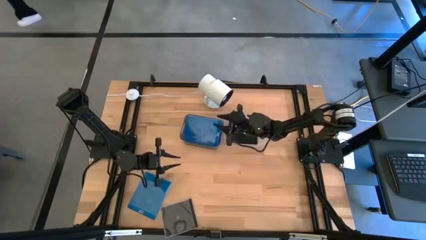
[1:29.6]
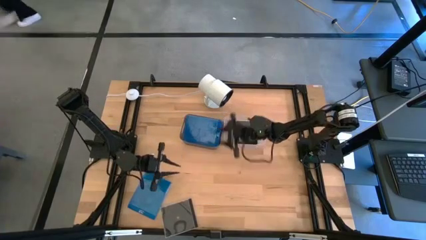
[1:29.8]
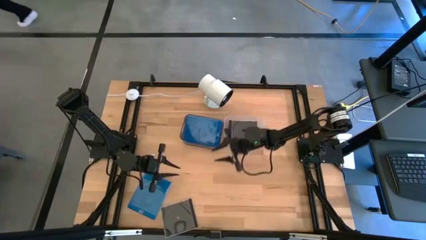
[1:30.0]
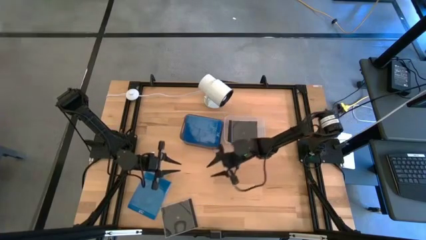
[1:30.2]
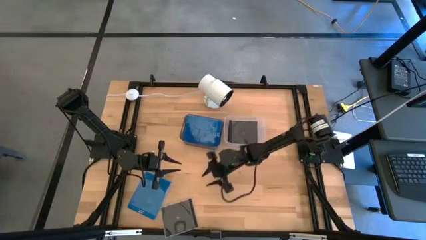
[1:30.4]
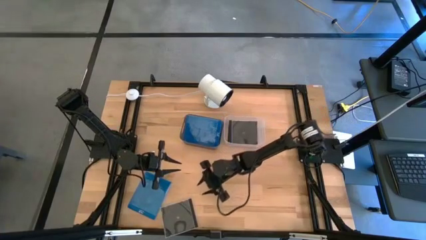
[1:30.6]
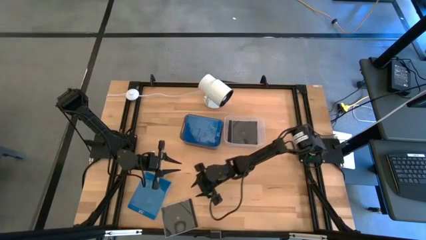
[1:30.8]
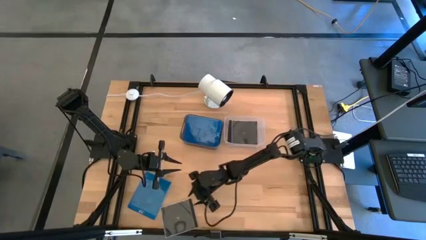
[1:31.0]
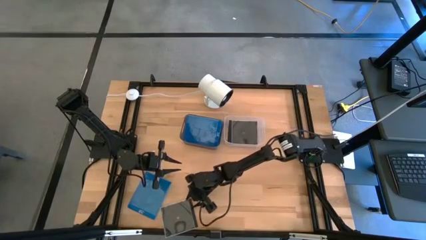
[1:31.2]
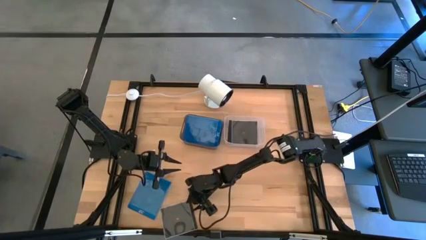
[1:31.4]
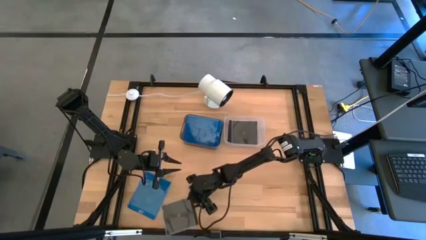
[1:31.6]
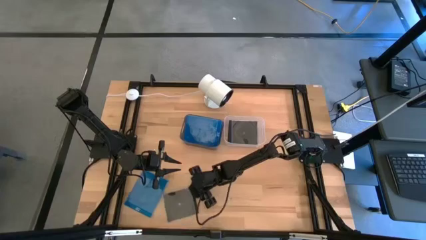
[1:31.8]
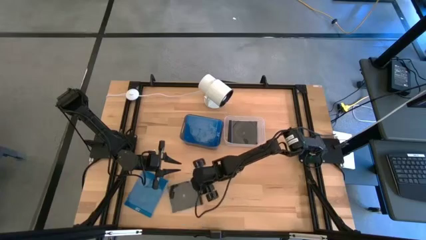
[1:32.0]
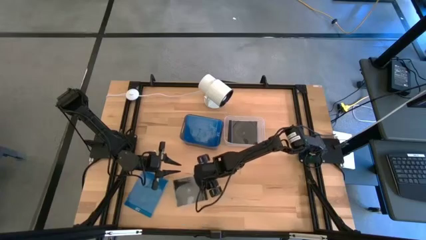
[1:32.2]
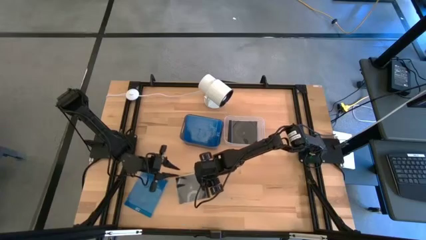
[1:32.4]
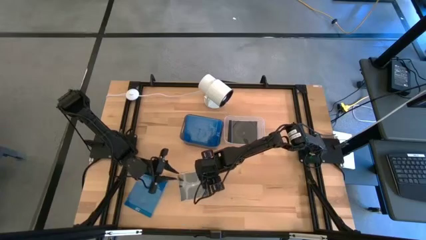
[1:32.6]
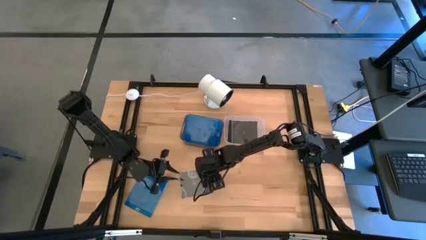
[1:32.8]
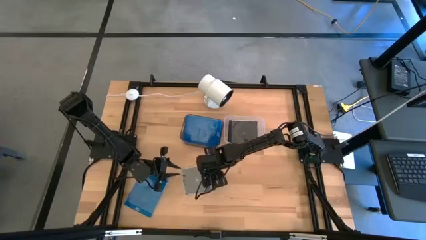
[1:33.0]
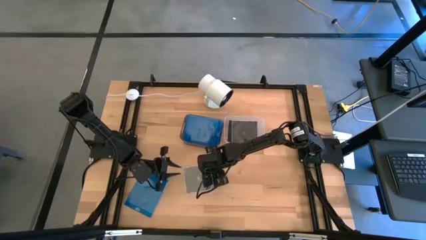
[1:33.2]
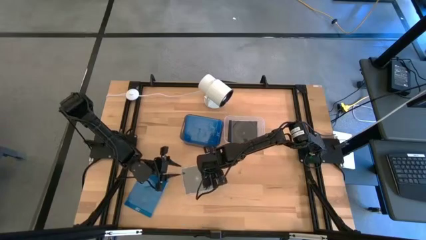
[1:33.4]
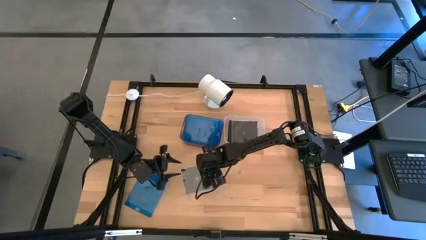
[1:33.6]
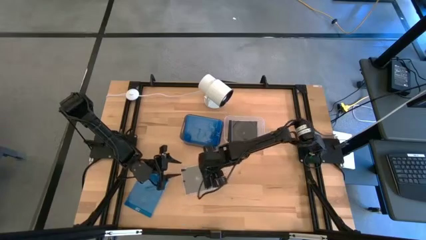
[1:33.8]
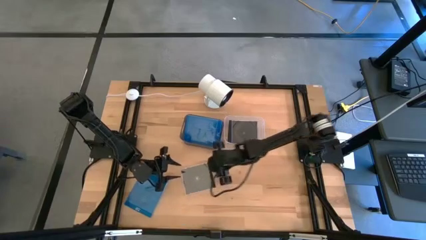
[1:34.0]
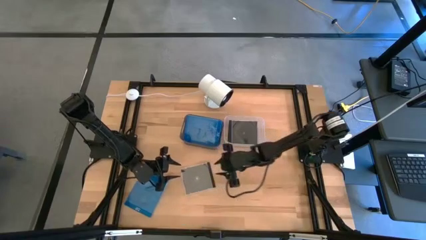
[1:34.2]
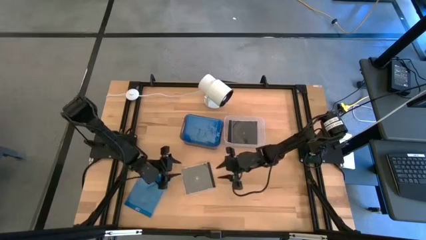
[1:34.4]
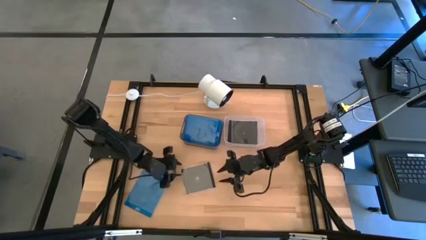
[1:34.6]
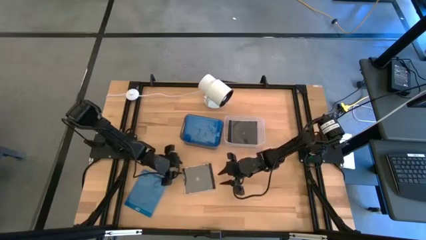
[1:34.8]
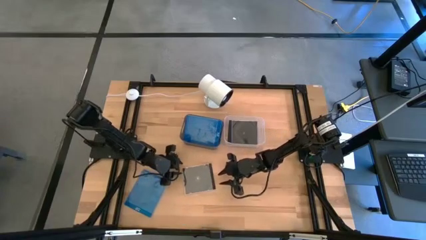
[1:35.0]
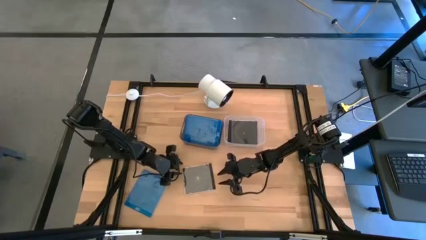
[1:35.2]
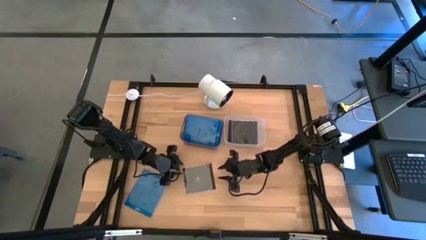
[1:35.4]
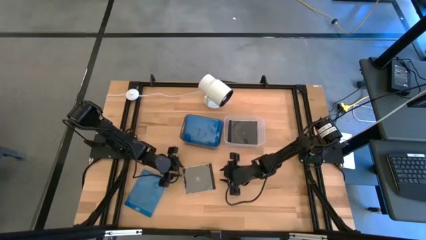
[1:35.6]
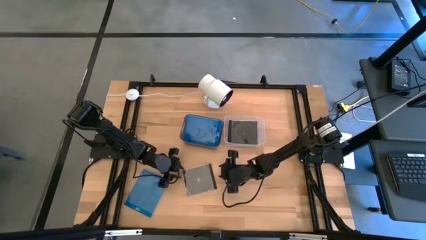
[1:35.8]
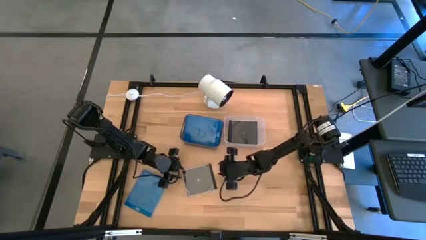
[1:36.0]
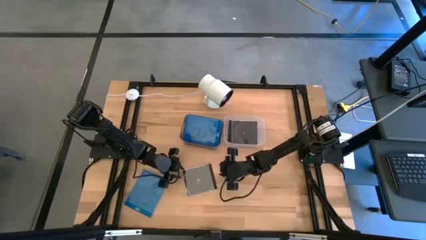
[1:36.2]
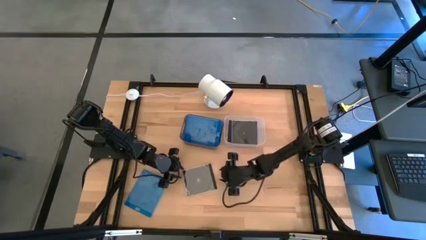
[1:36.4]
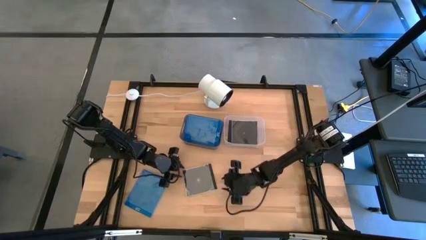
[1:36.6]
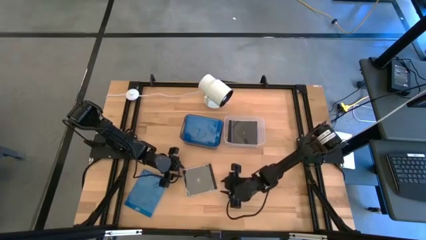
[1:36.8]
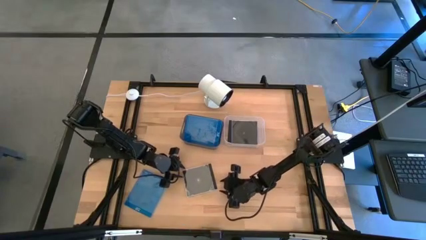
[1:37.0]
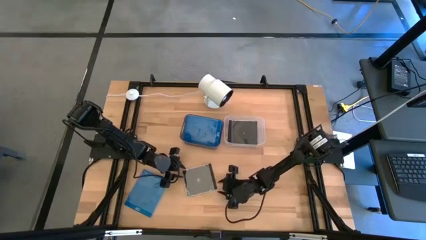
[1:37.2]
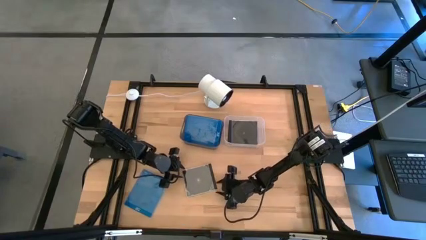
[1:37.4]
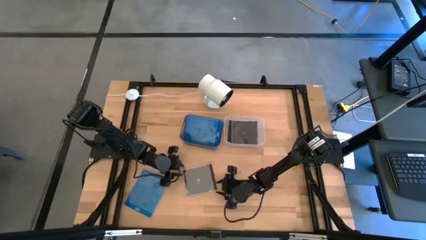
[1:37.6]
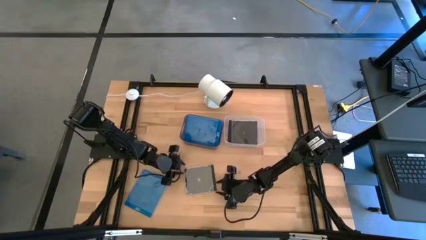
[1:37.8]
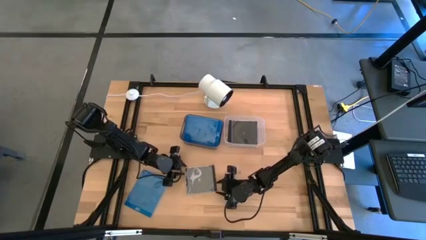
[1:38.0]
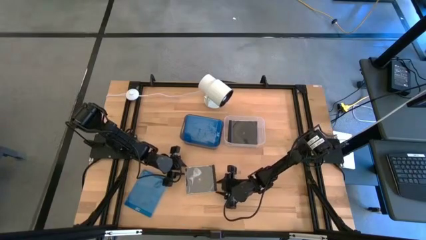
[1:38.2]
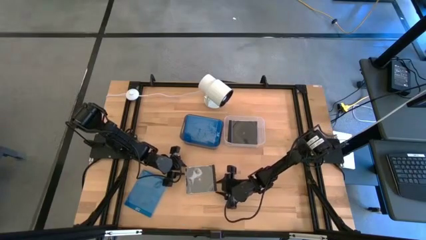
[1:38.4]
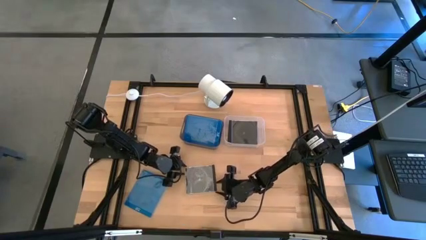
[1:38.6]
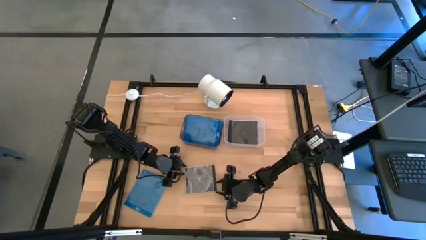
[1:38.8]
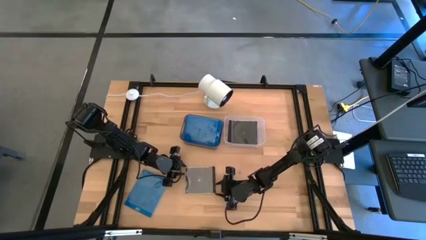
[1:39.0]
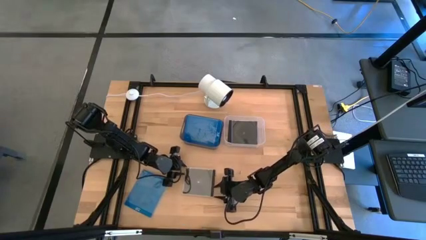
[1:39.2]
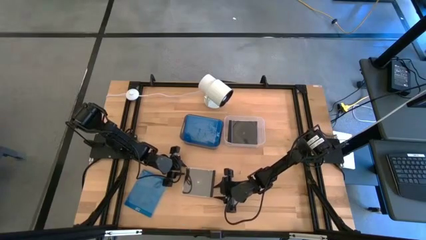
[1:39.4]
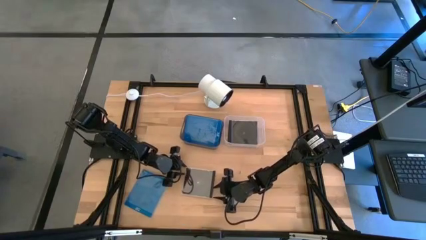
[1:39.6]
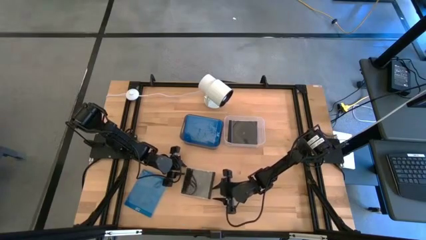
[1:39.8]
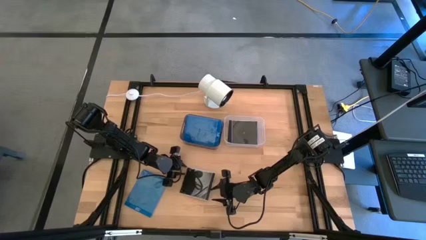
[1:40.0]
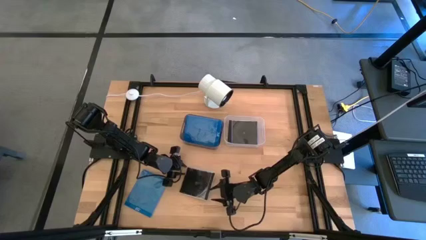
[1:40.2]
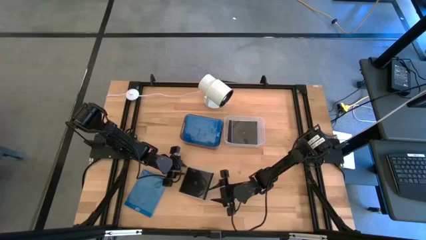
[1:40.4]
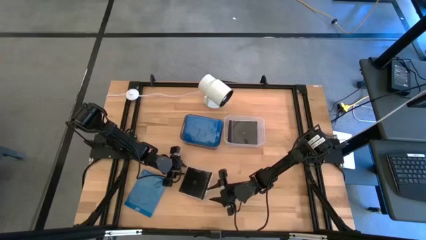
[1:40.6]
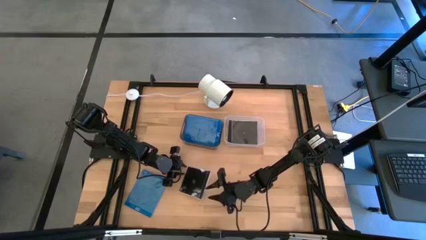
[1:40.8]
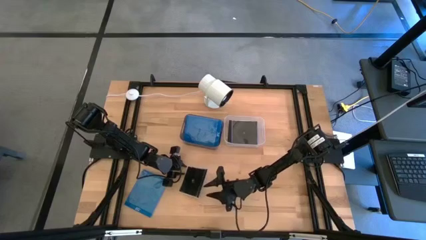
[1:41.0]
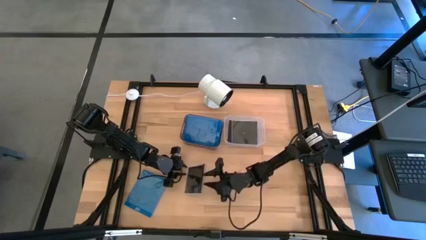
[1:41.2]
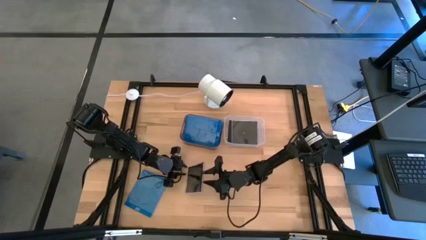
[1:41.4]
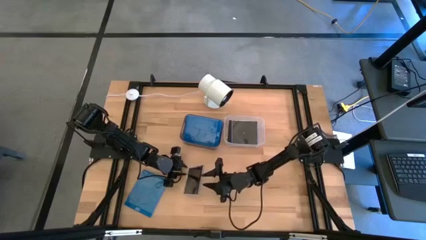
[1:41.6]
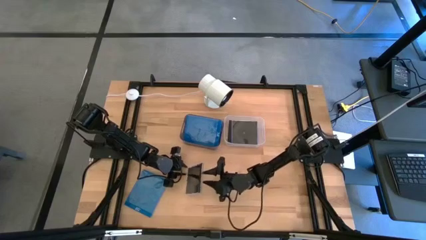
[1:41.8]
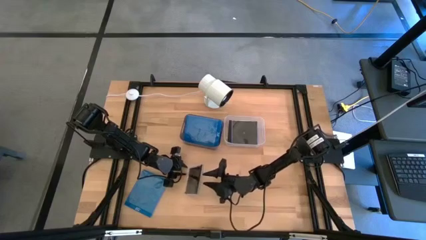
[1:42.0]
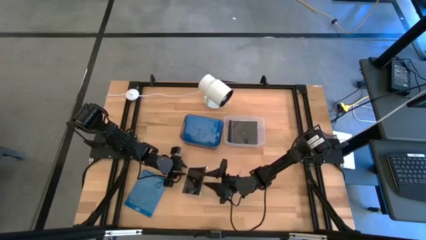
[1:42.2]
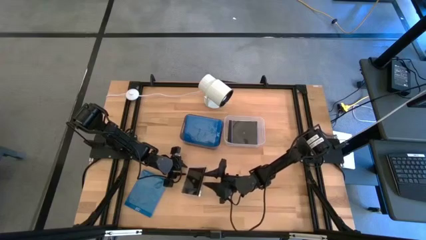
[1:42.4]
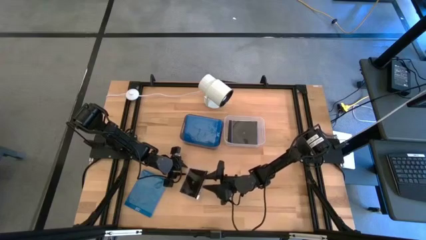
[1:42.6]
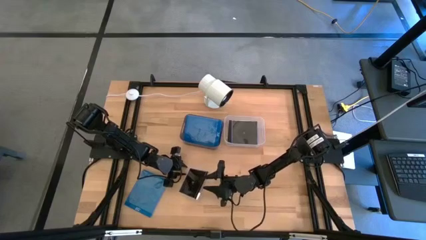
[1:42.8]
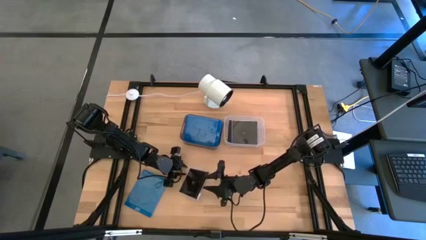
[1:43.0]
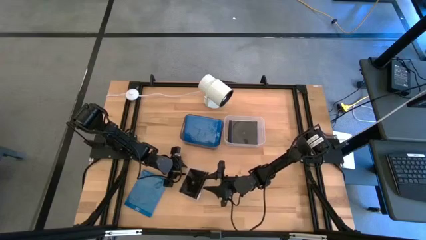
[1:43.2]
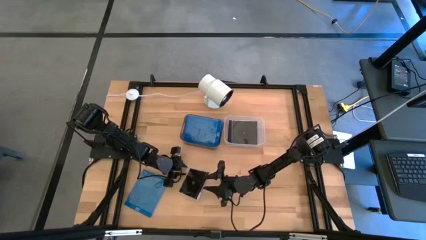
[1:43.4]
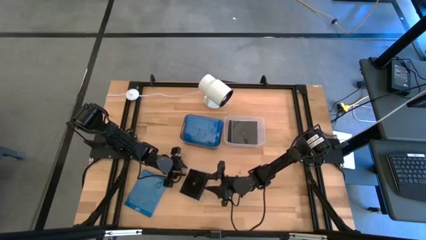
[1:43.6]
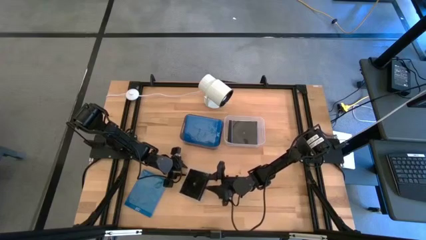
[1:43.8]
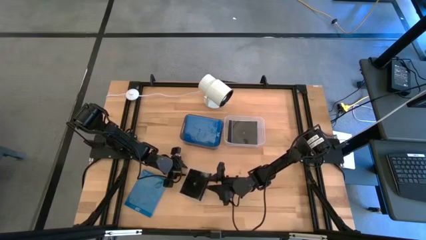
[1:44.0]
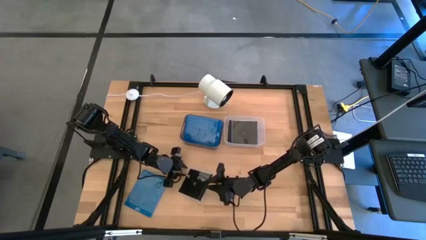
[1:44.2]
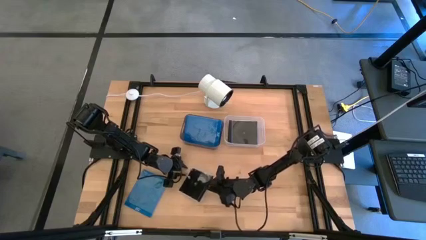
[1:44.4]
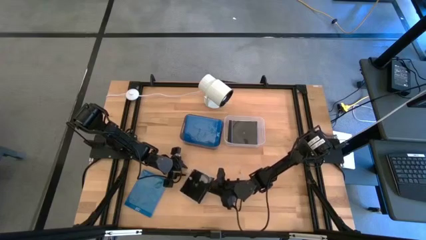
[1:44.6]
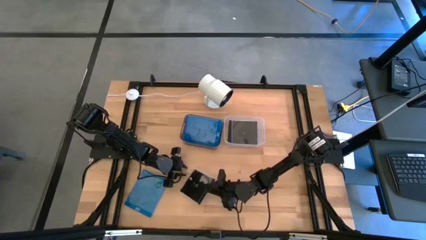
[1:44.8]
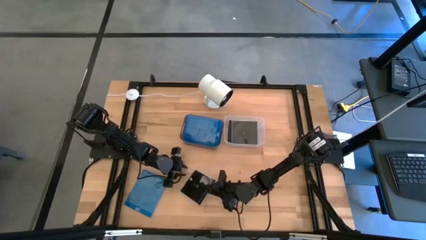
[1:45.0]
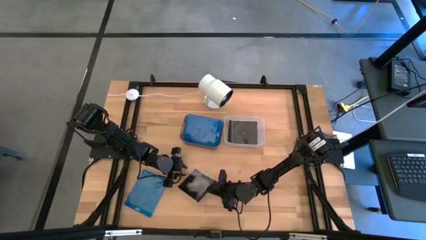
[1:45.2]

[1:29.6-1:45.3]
Task: Pick & place jewel cases by type
Put the black cd case into the transparent bin
